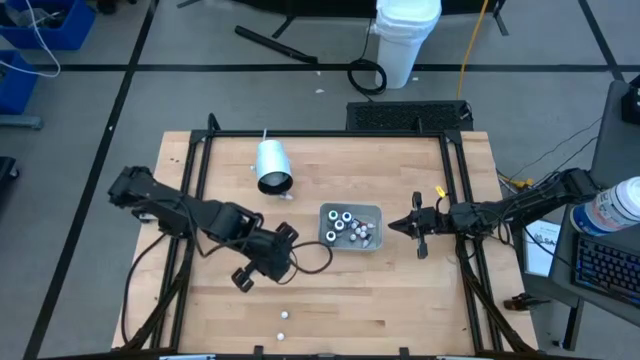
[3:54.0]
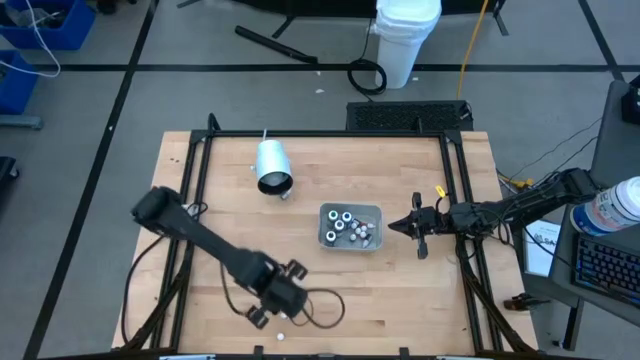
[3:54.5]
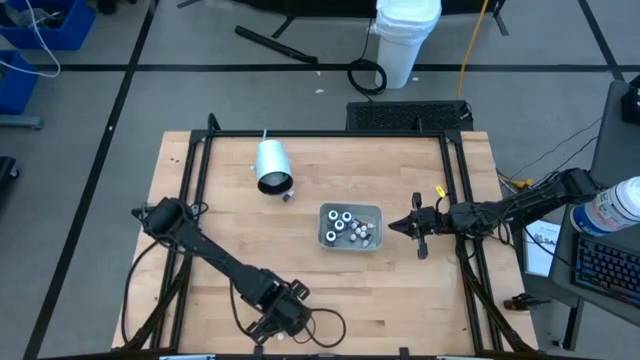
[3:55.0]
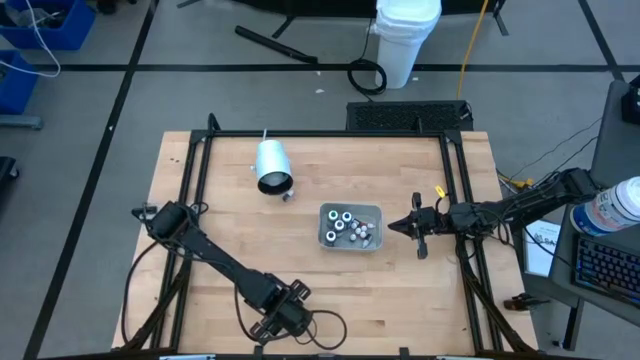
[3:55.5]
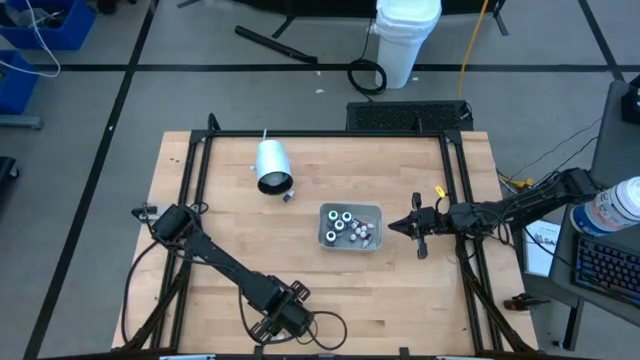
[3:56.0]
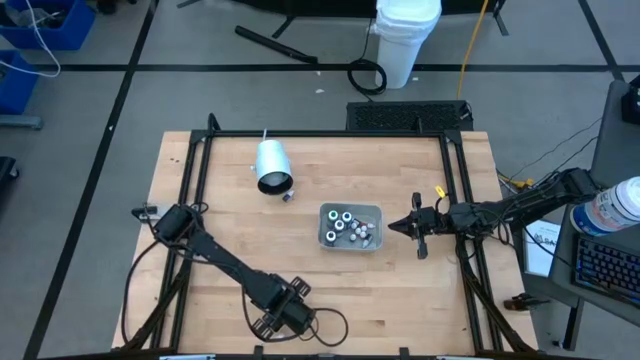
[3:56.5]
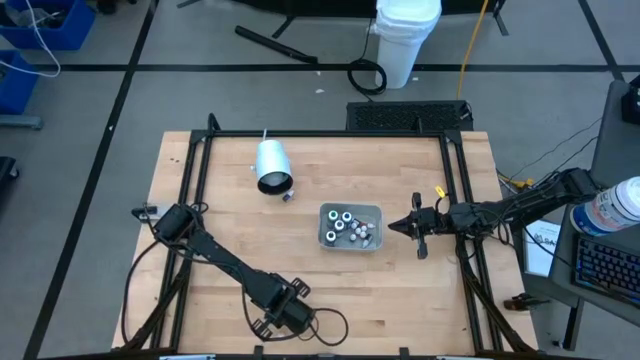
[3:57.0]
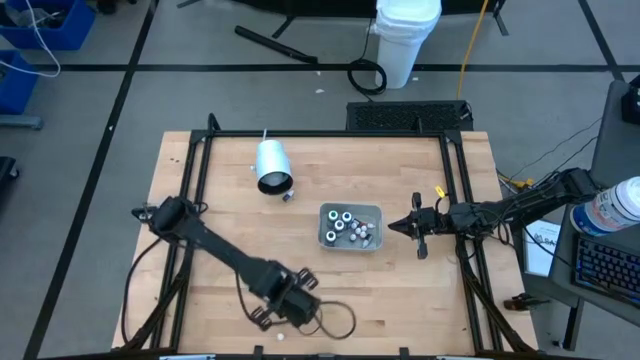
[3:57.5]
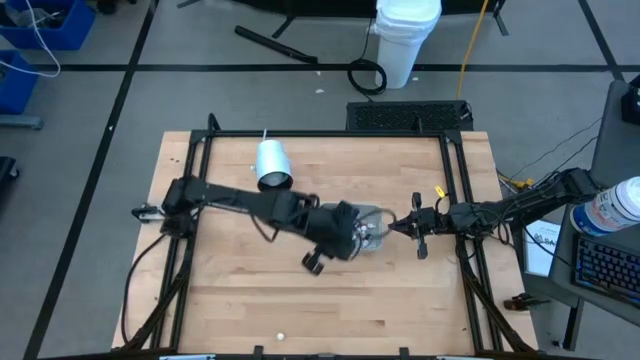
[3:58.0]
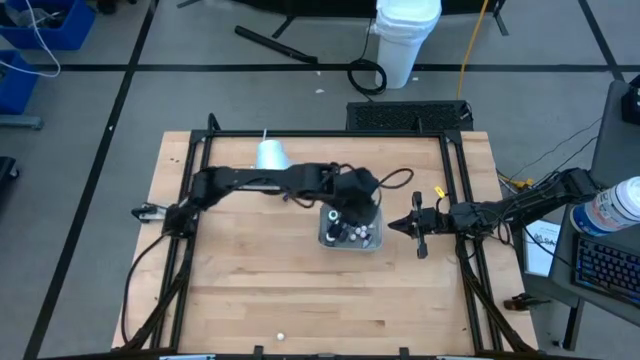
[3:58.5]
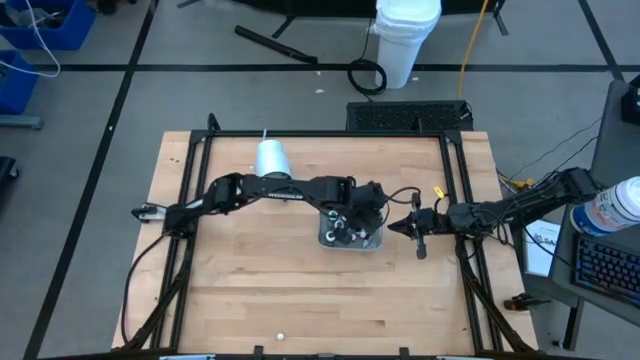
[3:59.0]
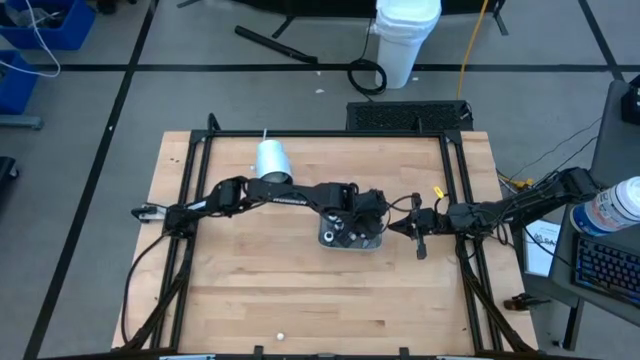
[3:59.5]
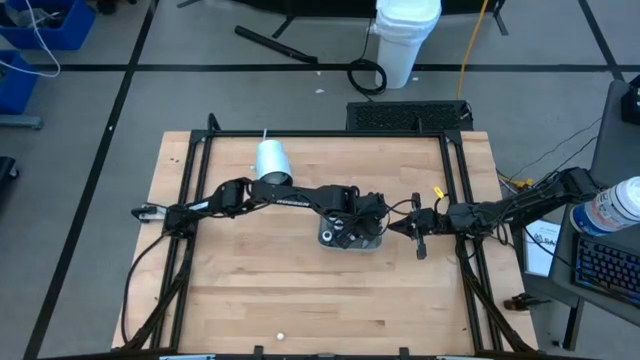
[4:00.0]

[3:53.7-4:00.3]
Task: Pick & Place food coloring
Put the bottom small blue food coloring bottle into the white bin

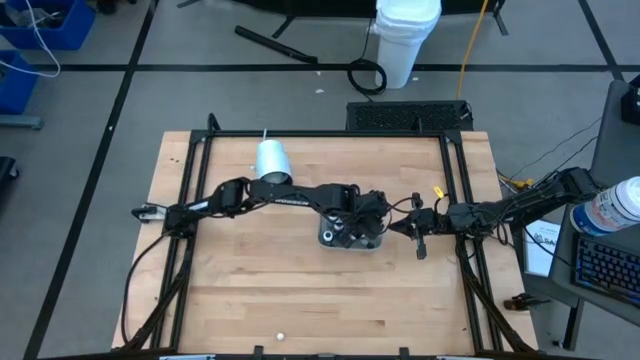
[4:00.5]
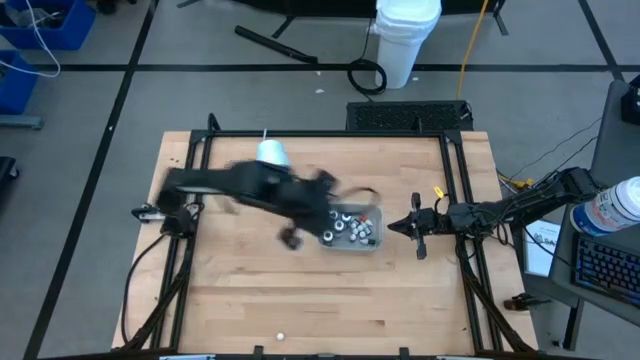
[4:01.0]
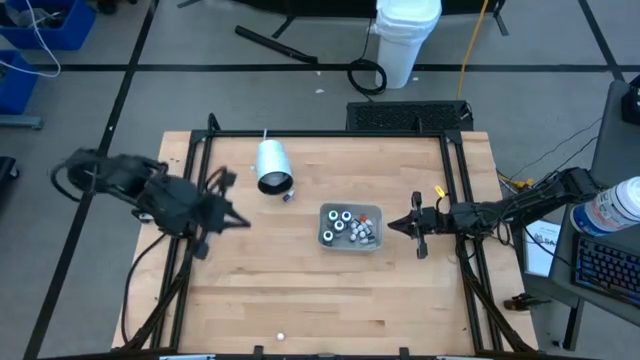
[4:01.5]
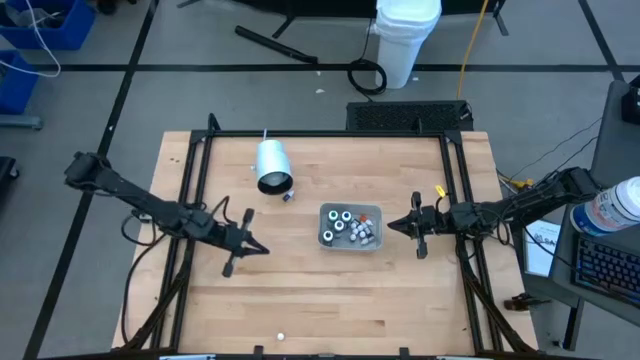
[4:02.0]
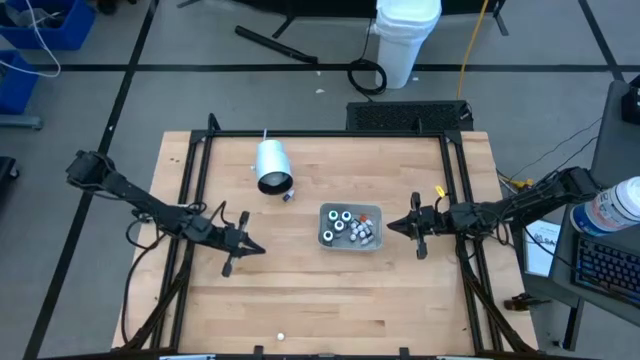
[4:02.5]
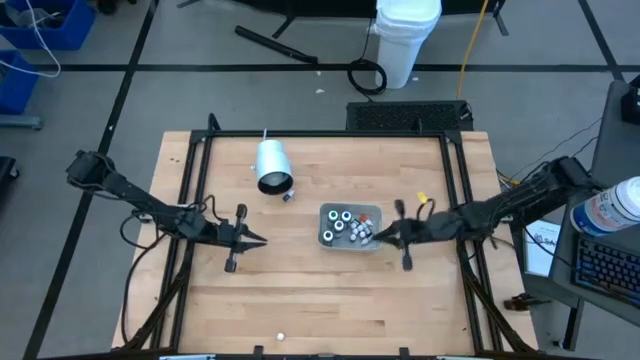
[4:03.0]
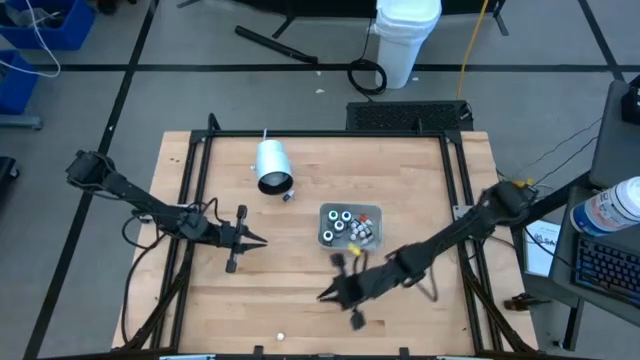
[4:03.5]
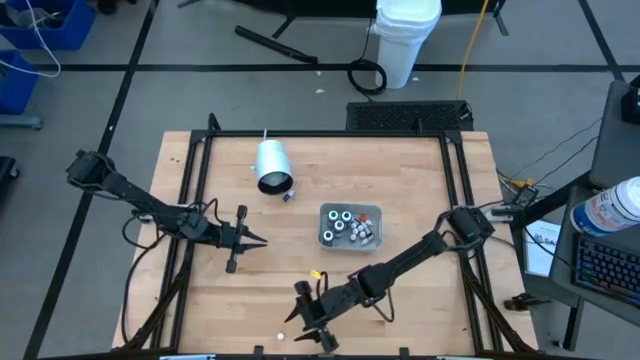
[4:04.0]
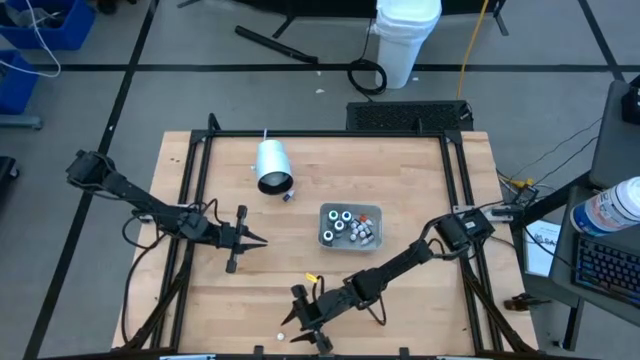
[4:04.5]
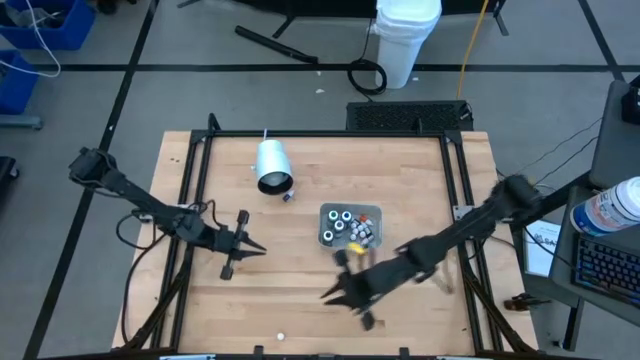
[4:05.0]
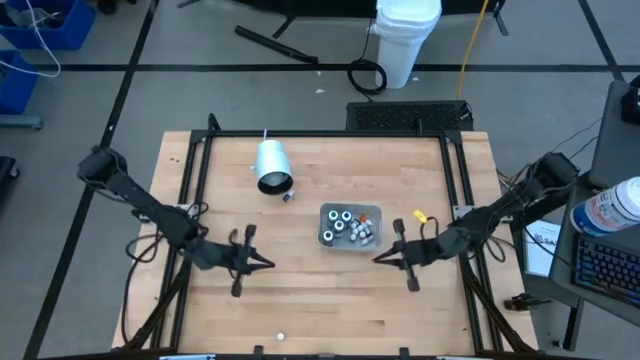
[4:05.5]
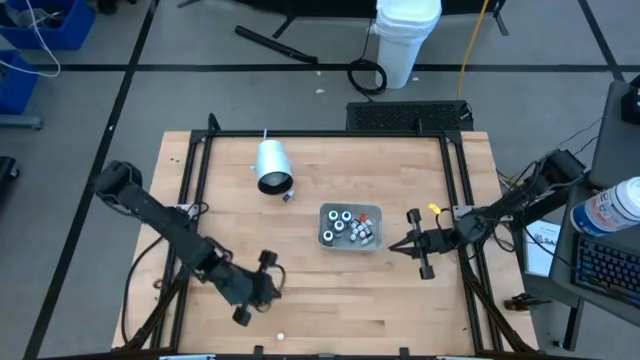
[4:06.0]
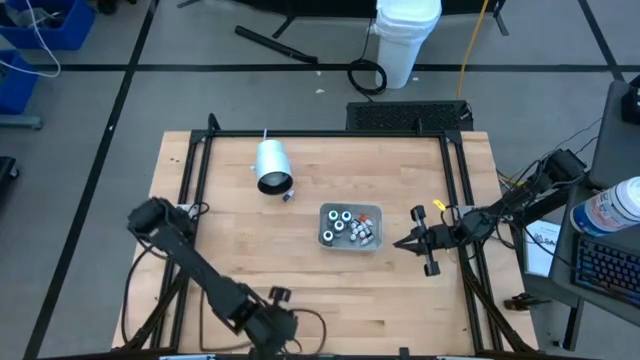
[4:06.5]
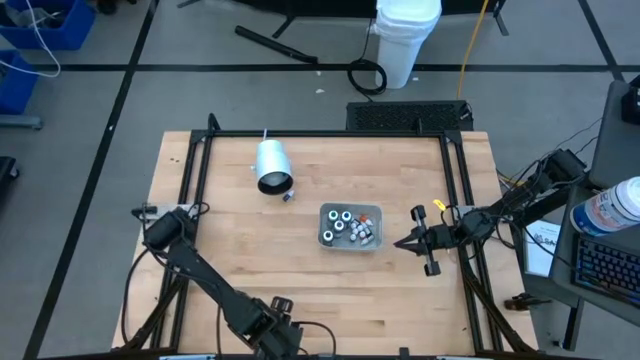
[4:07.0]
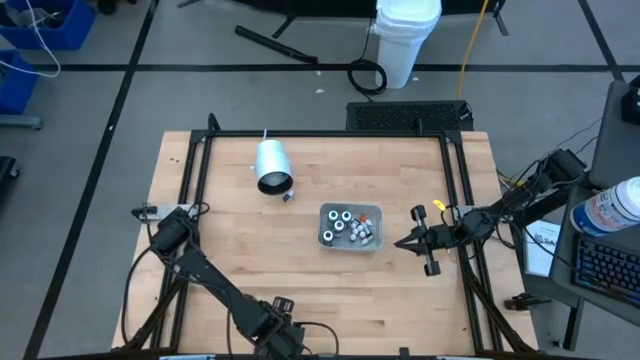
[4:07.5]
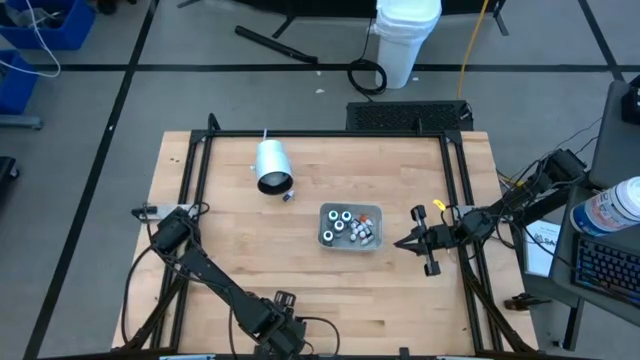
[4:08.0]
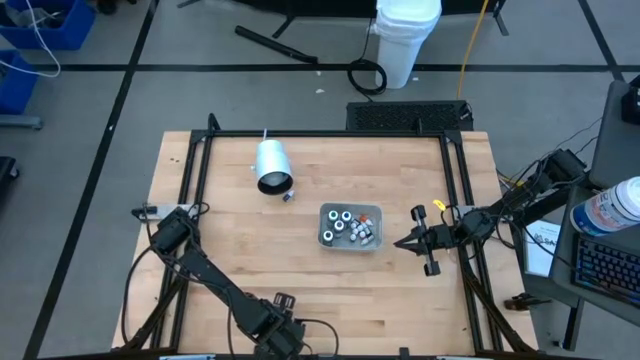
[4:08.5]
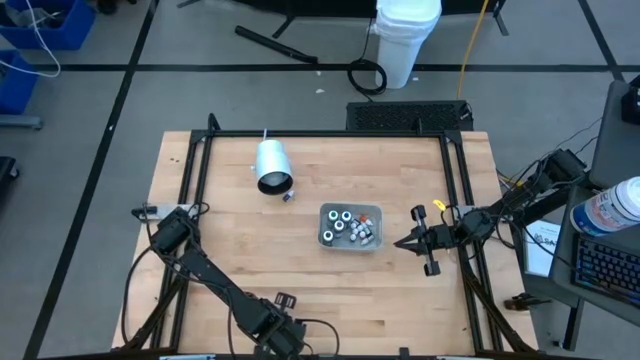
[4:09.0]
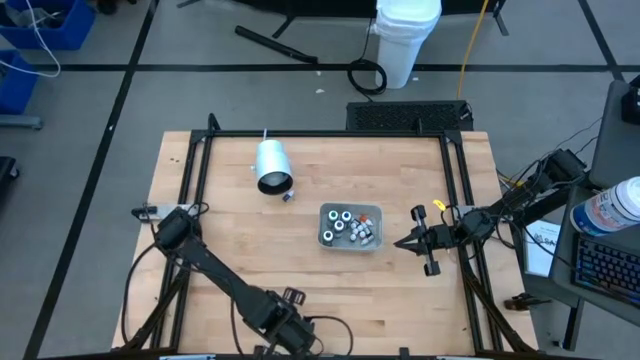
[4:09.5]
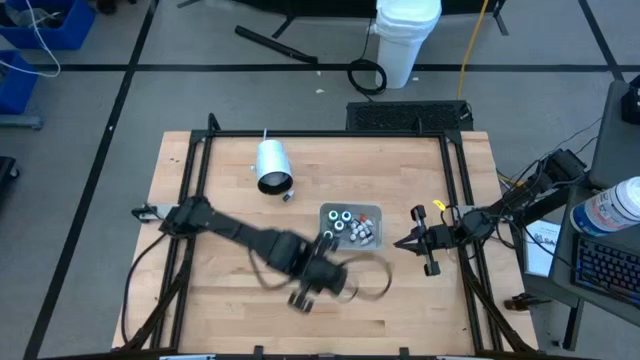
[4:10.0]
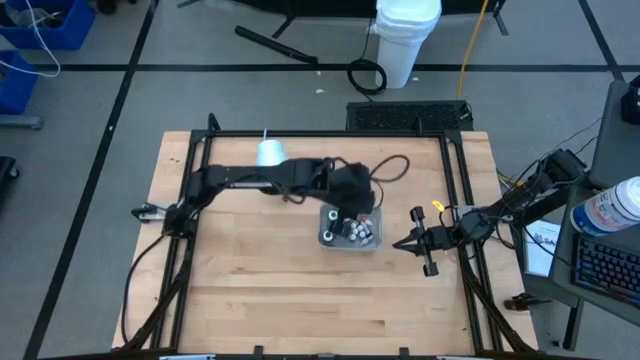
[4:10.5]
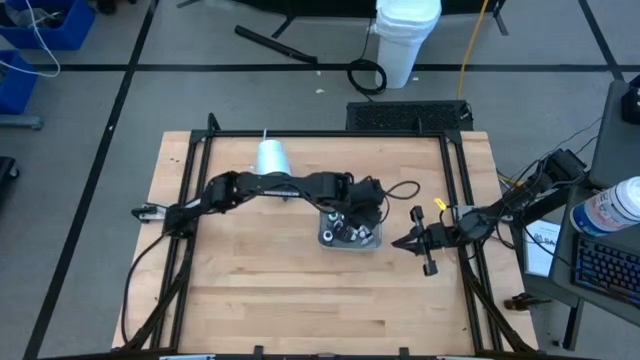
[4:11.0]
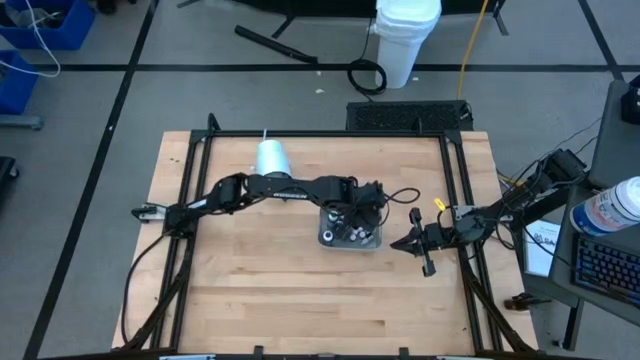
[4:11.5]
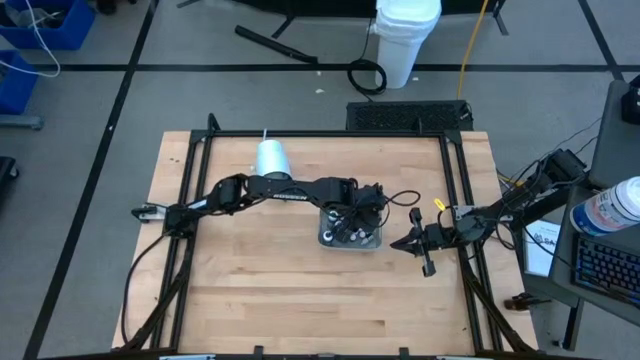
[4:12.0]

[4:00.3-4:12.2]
Put the small orange food coloring bottle into the white bin

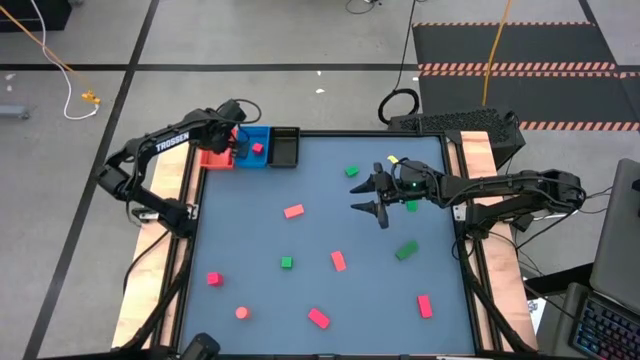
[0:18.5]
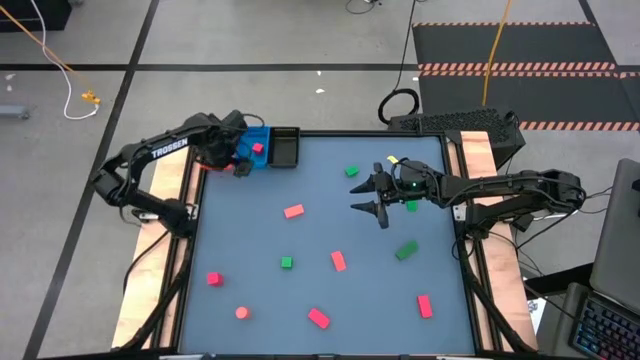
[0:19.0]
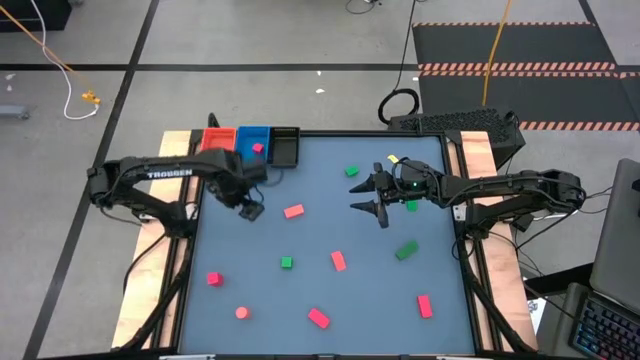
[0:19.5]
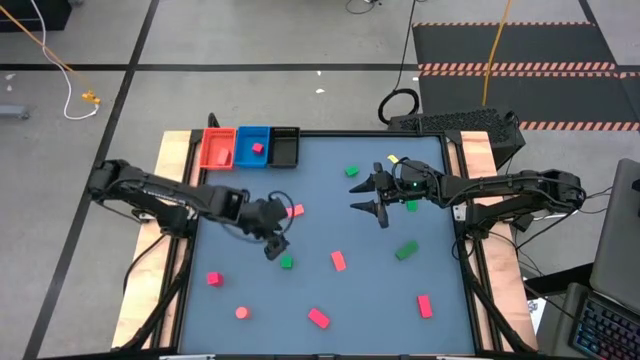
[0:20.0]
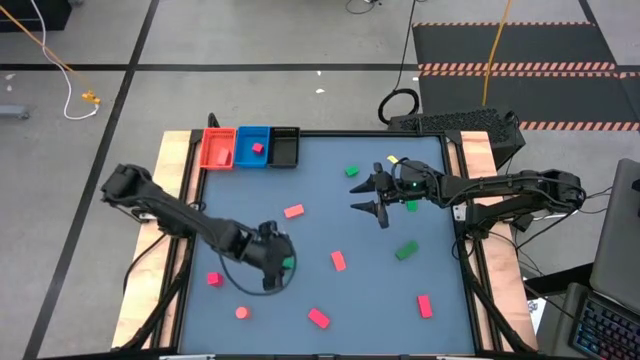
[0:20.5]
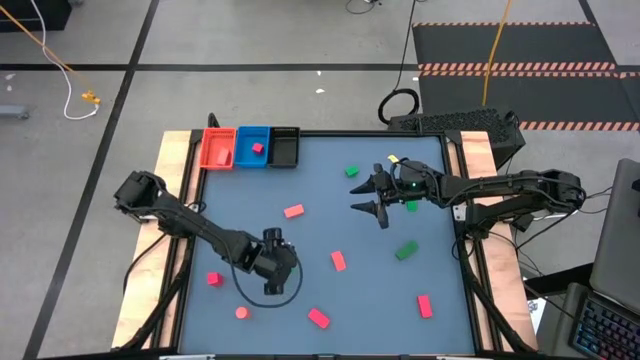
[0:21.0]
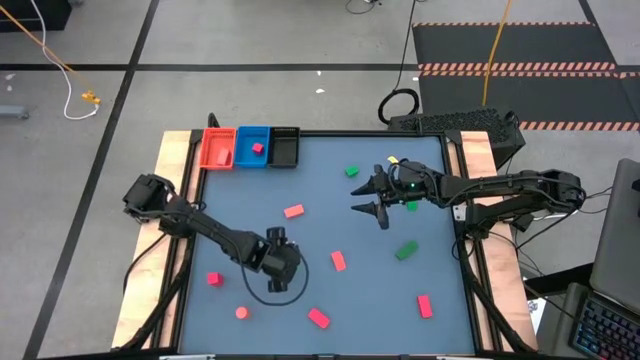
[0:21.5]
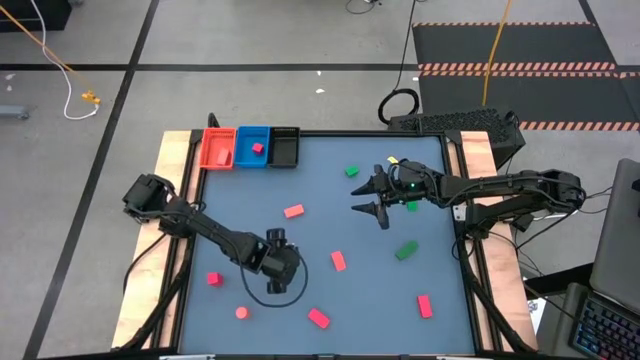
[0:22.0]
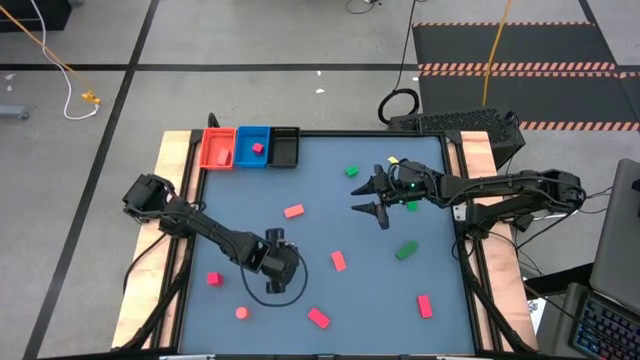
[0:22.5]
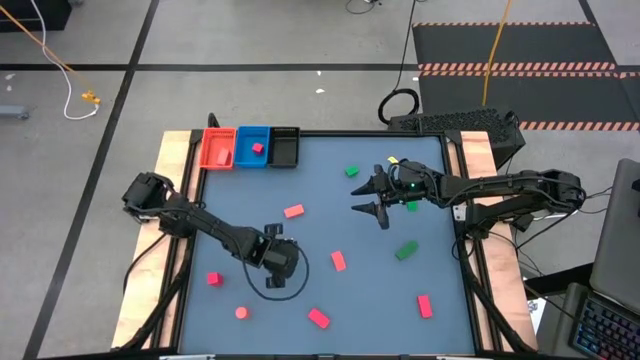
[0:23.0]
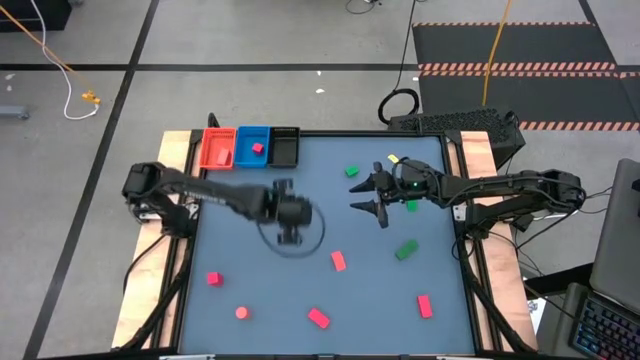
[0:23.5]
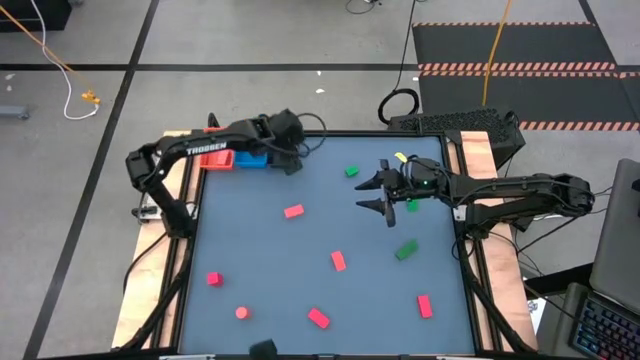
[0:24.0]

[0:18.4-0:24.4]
Task: Sort & place blocks by color
Put the green block into the black bin
